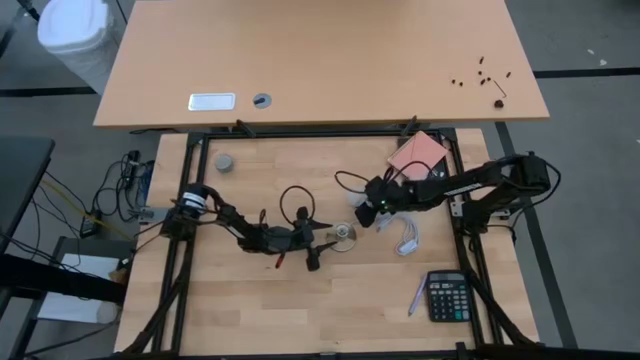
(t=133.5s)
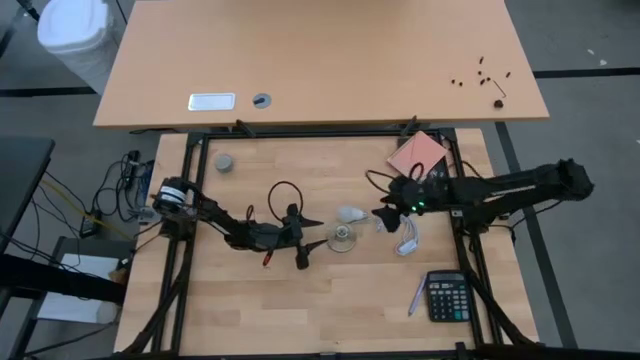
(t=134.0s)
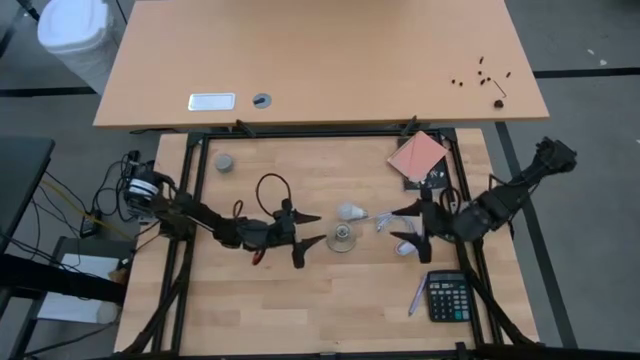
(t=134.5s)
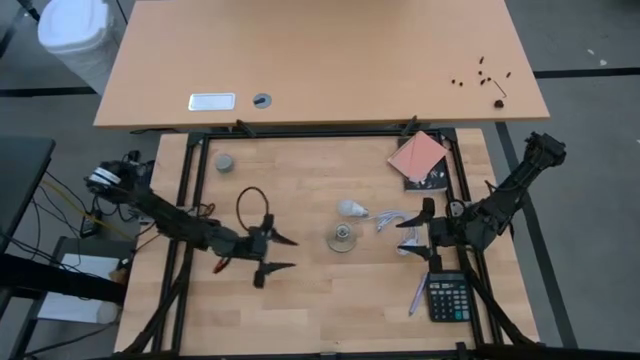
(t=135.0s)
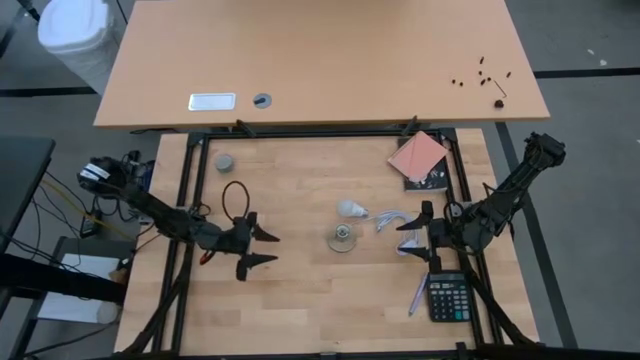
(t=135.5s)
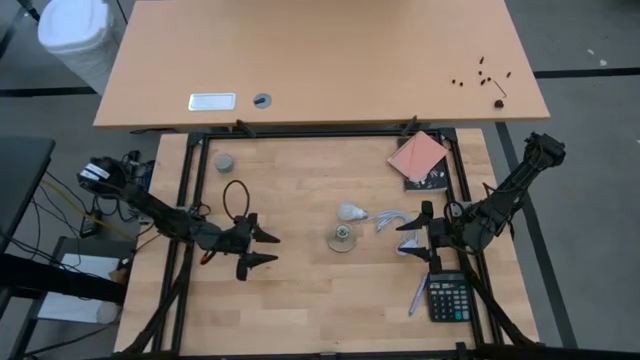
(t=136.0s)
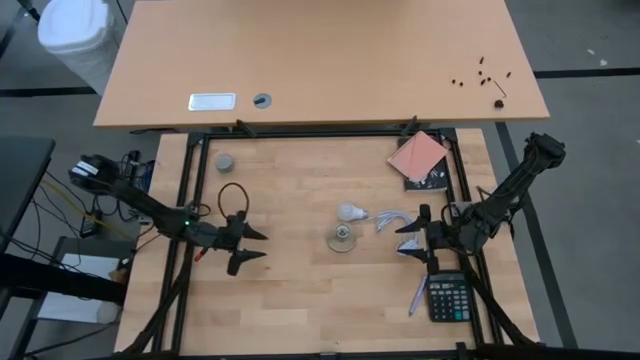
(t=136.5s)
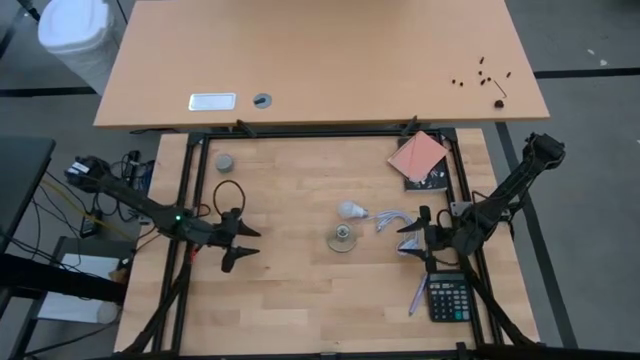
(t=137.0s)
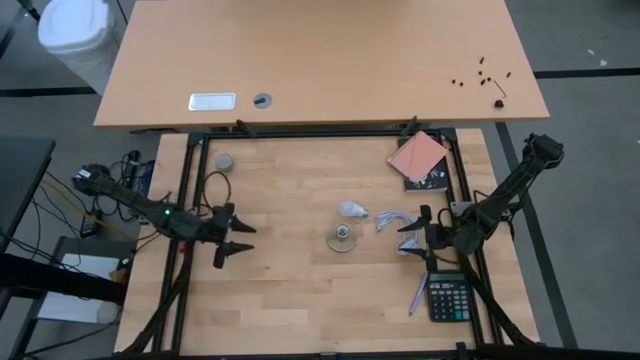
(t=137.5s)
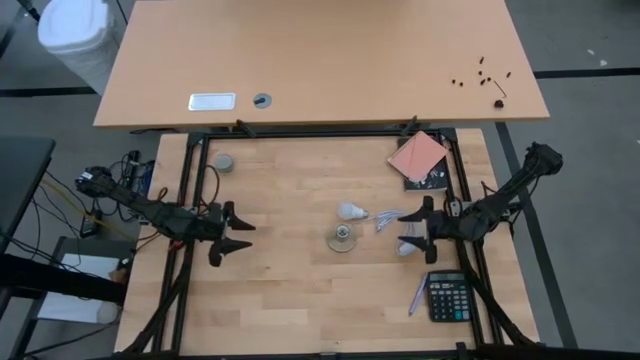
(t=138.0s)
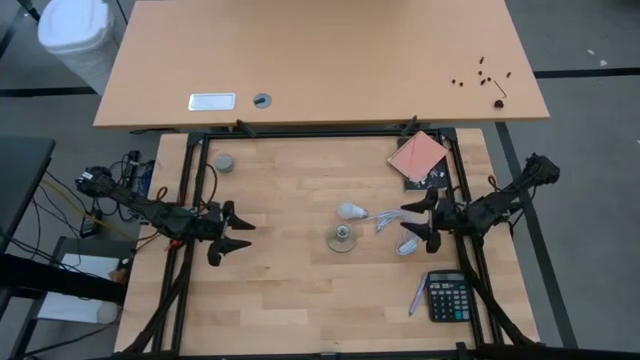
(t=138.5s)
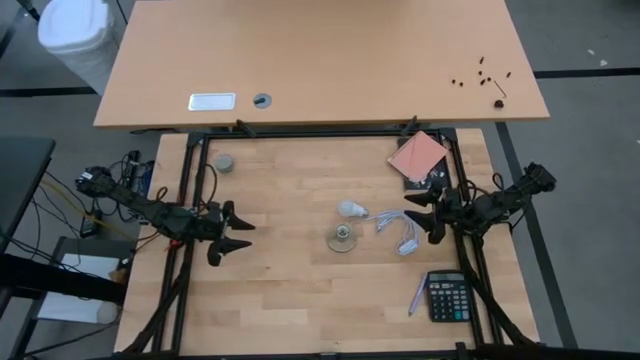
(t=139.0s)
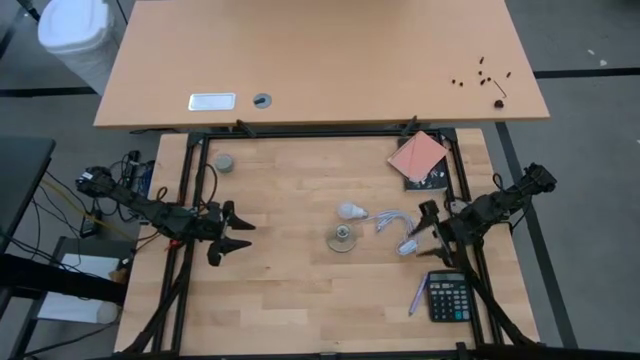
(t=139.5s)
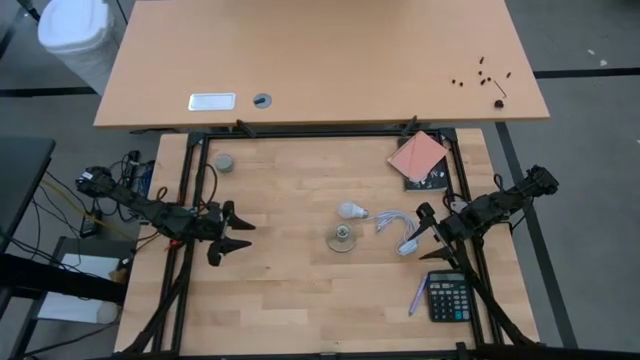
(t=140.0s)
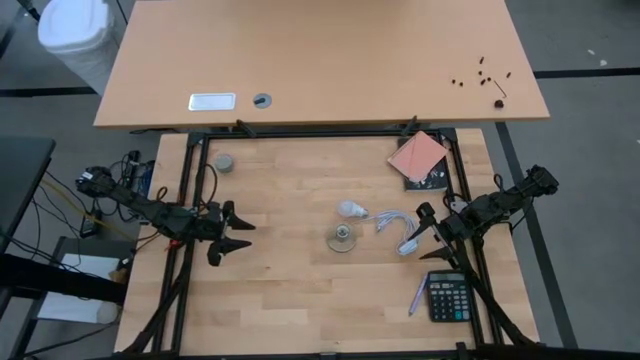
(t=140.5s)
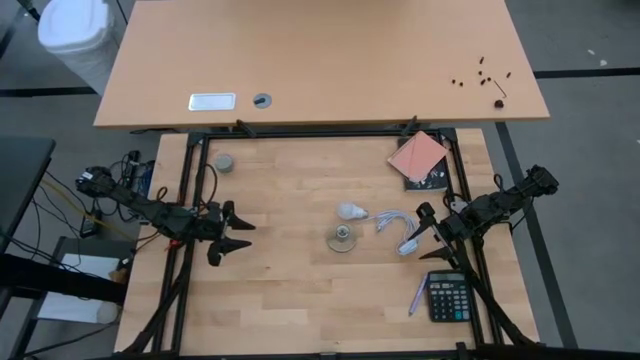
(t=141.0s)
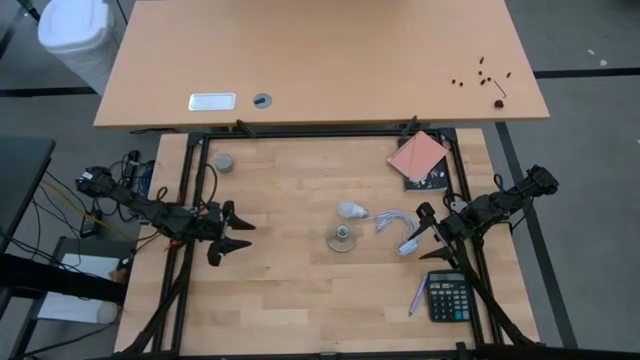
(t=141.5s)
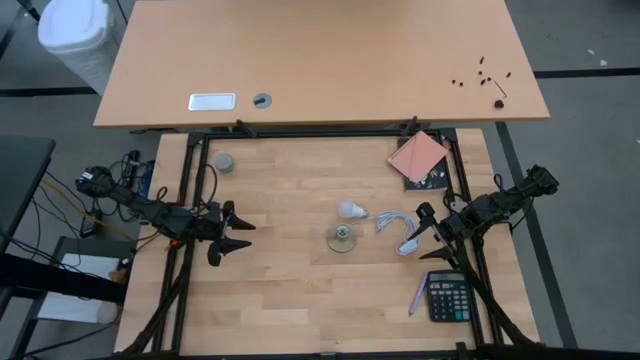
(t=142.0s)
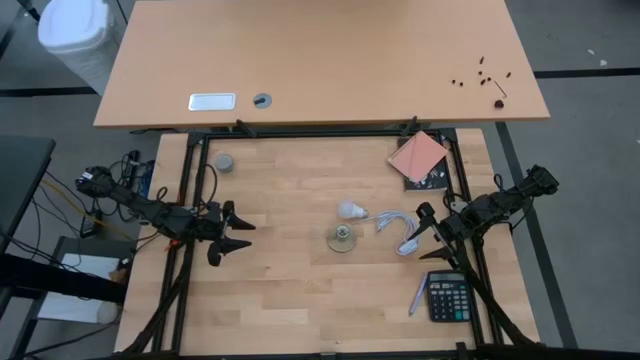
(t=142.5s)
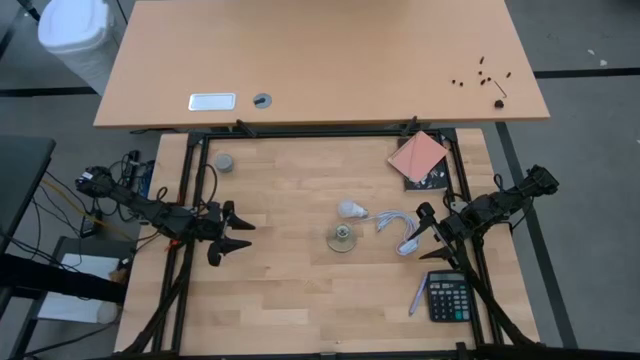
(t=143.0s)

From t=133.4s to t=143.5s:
Task: Screw lightbulb
Return to Home Position

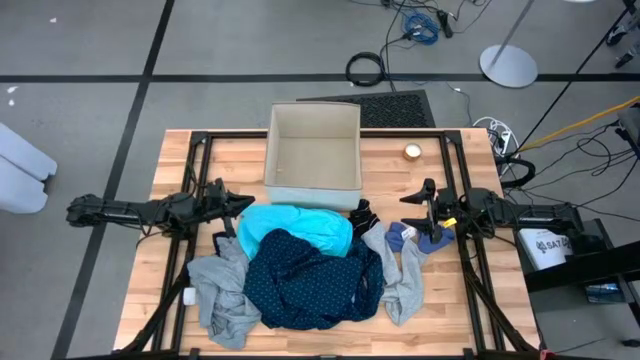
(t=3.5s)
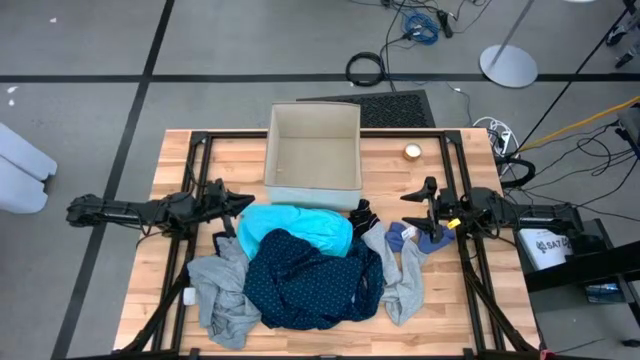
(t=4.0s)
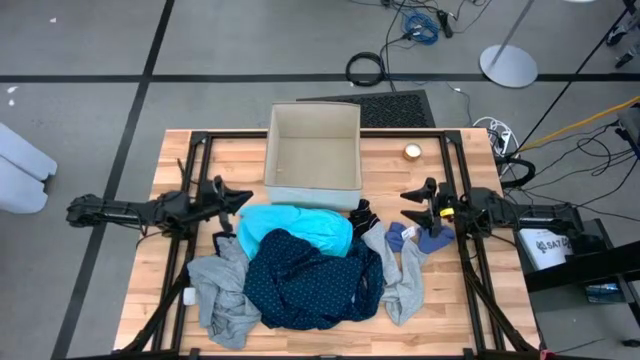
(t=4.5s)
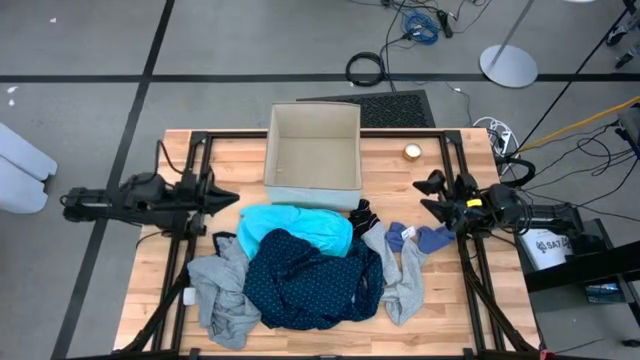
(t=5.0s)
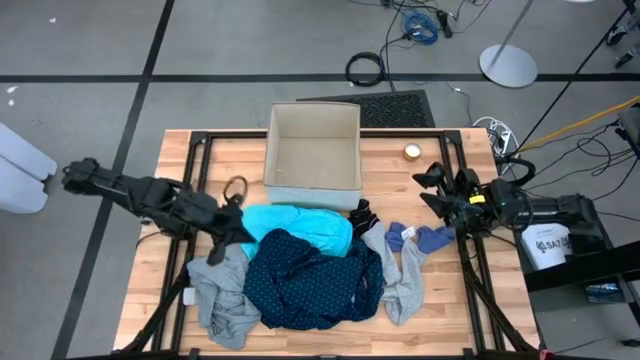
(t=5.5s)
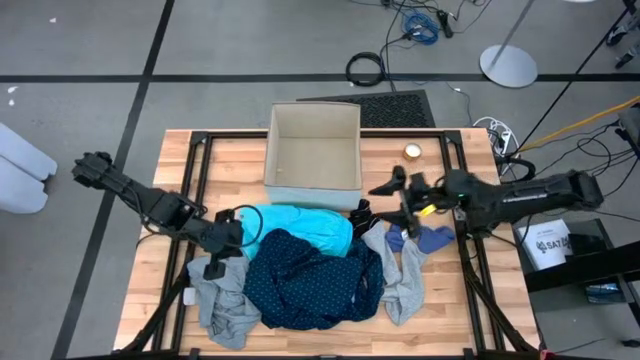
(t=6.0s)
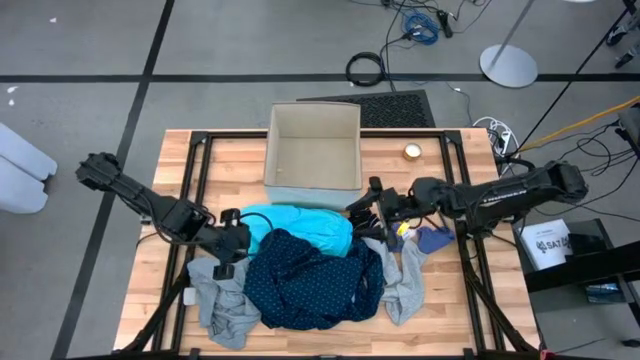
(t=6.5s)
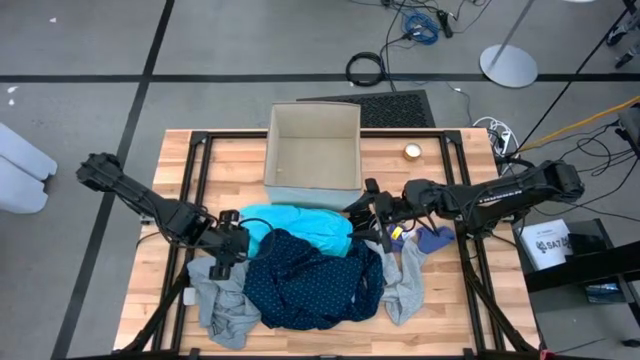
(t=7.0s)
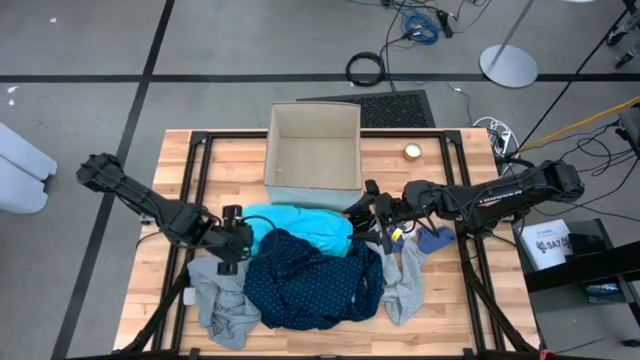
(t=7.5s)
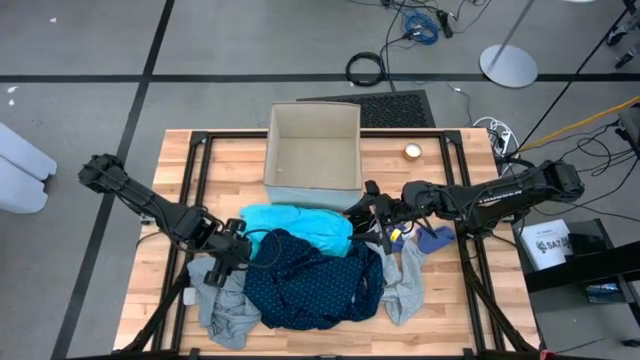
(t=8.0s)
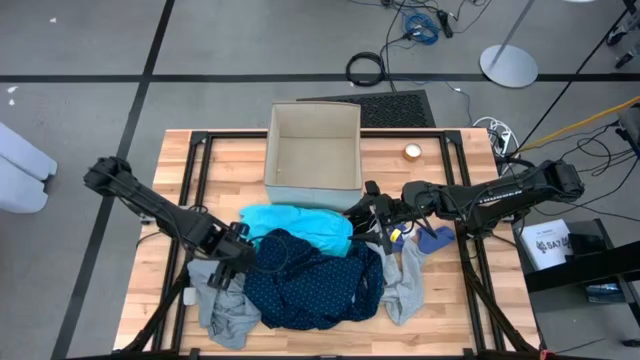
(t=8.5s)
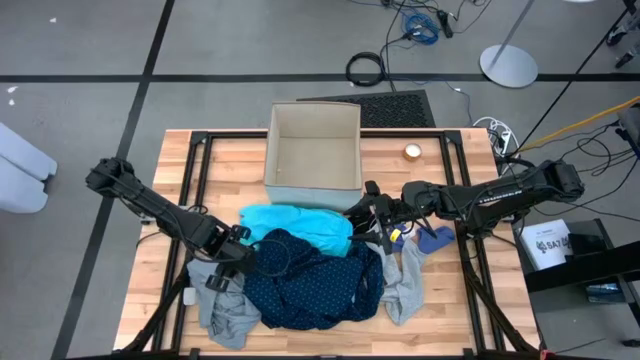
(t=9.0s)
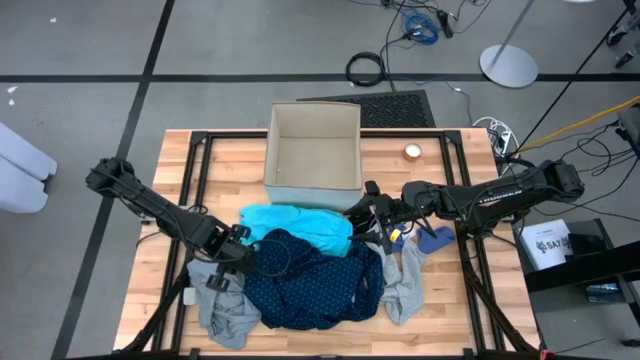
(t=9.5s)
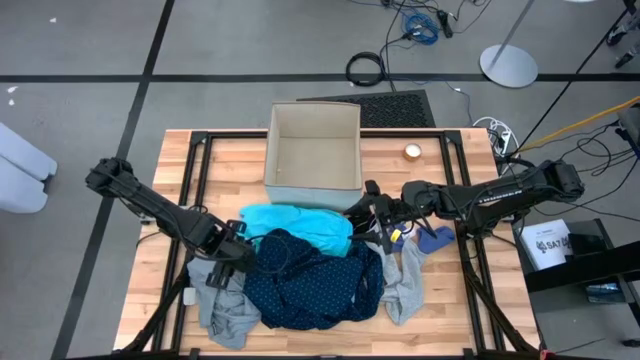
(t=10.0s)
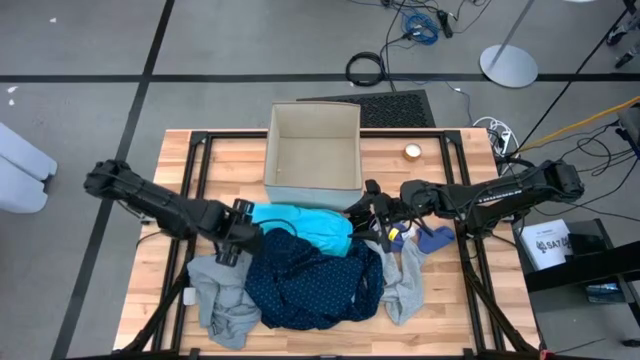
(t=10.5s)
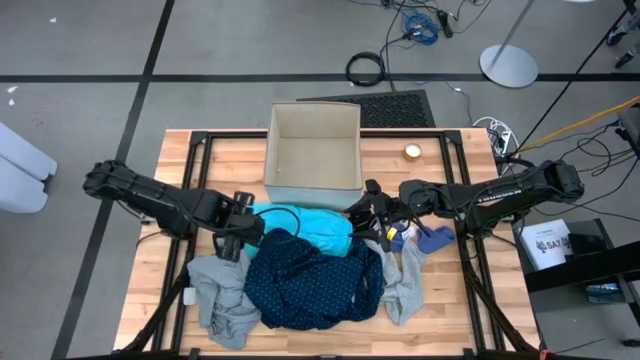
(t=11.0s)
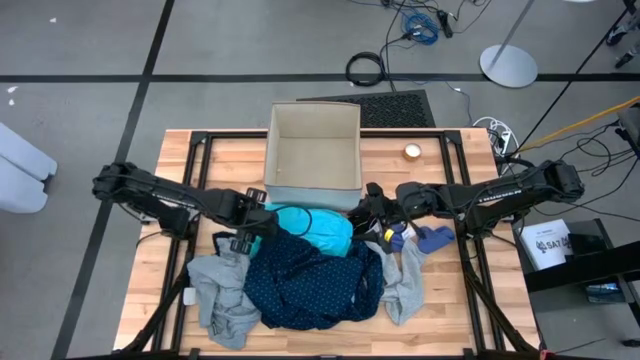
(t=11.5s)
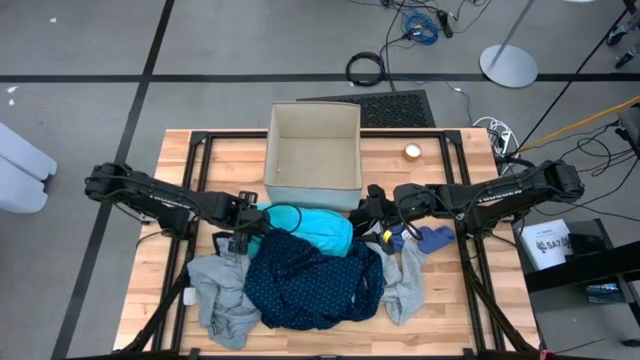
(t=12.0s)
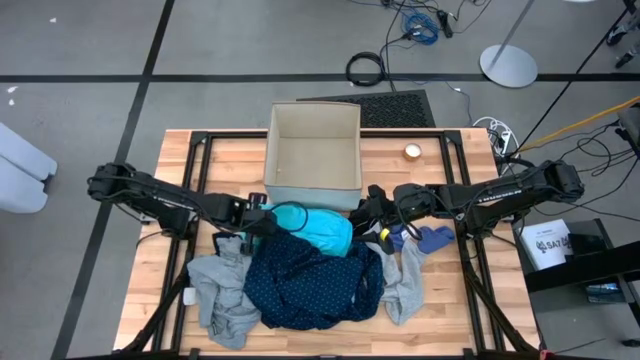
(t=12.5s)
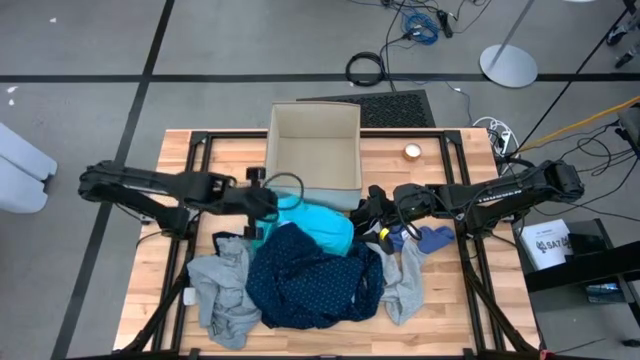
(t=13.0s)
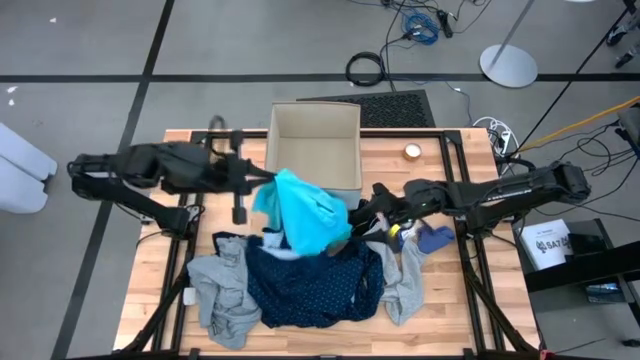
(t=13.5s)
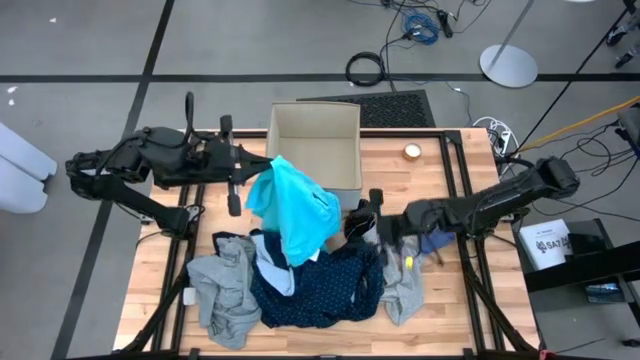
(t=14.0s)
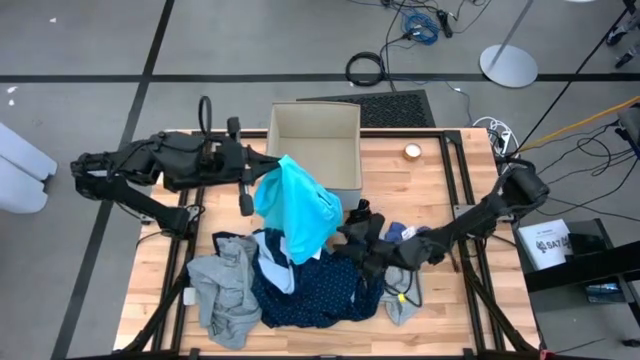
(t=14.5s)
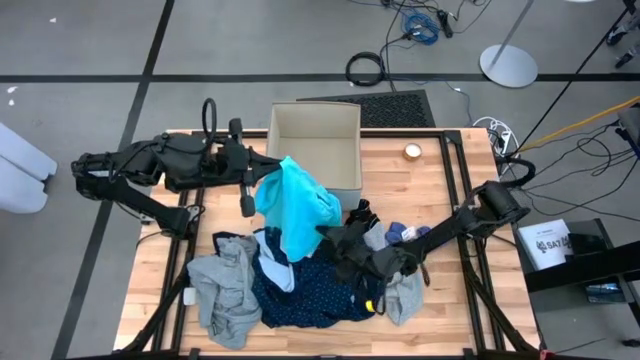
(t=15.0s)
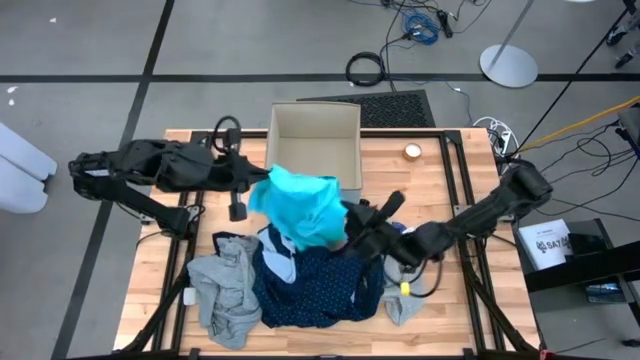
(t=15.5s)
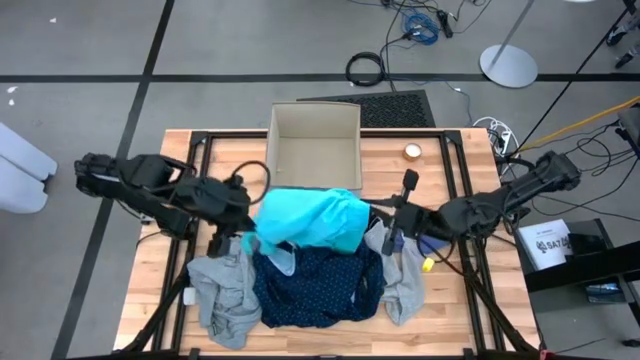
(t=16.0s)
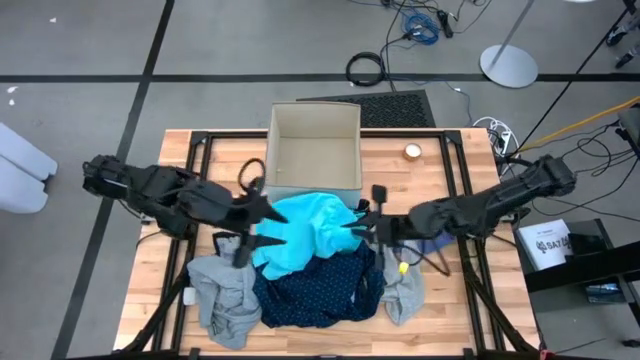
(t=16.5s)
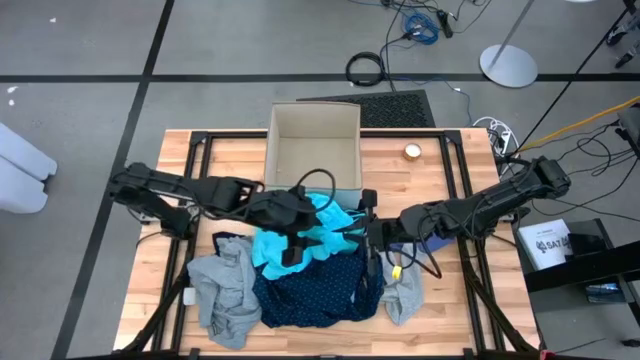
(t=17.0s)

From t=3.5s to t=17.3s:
Task: Sort clothes
Put the light blue shorts into the white laundry organizer
